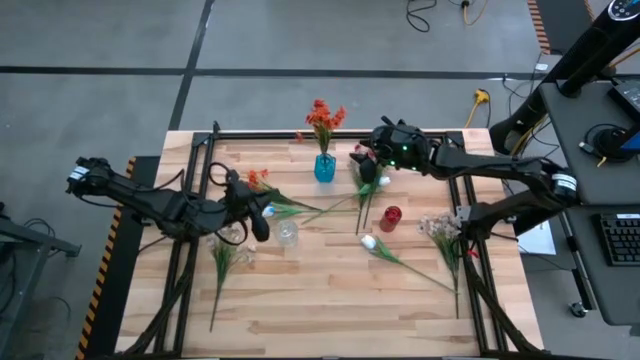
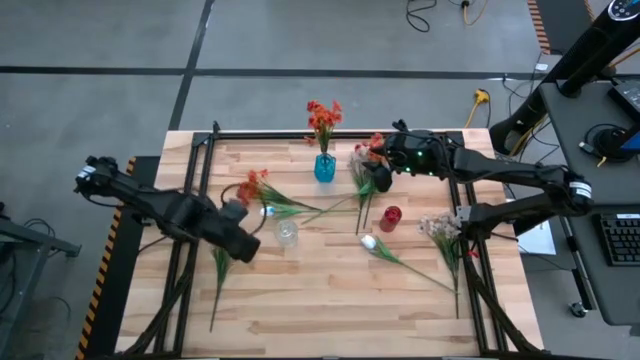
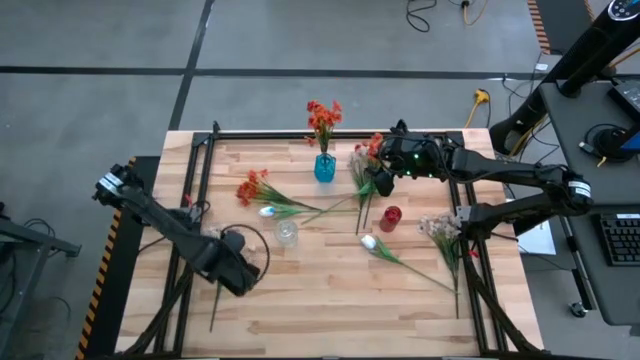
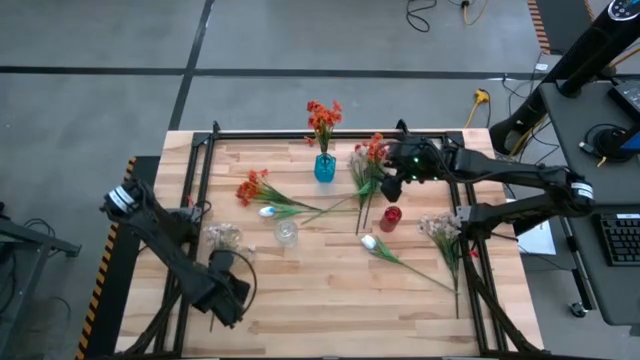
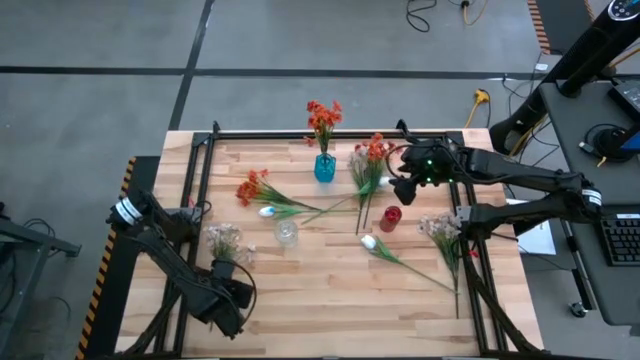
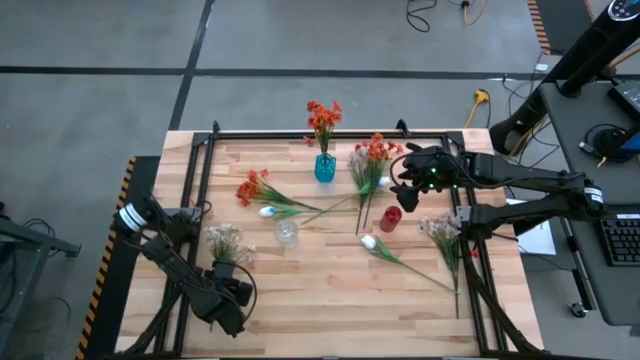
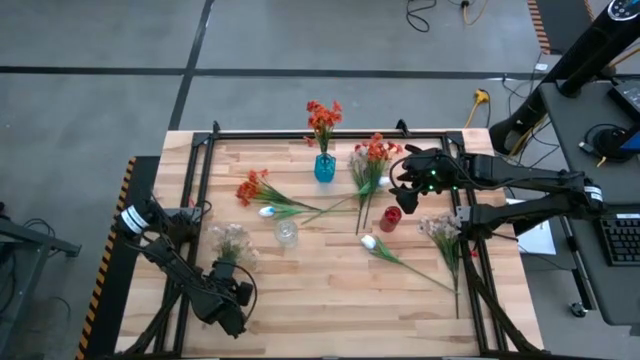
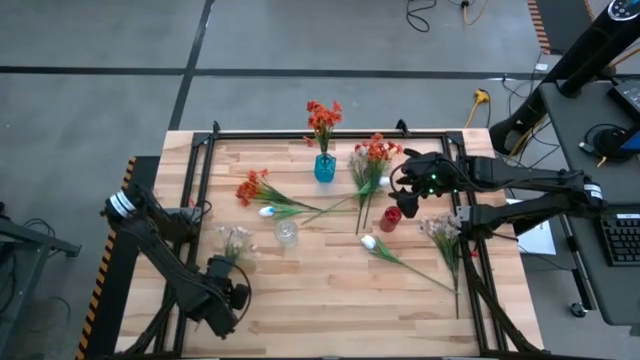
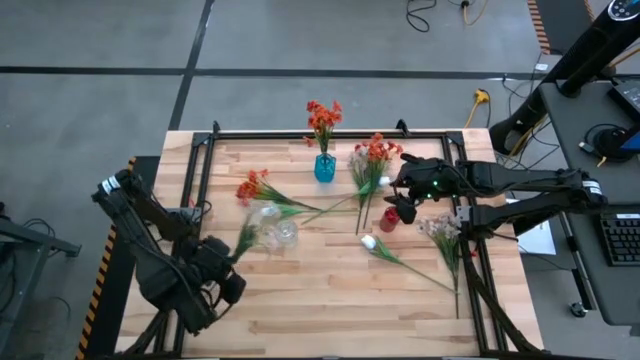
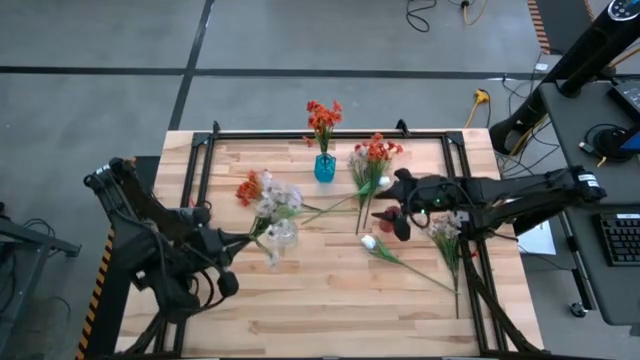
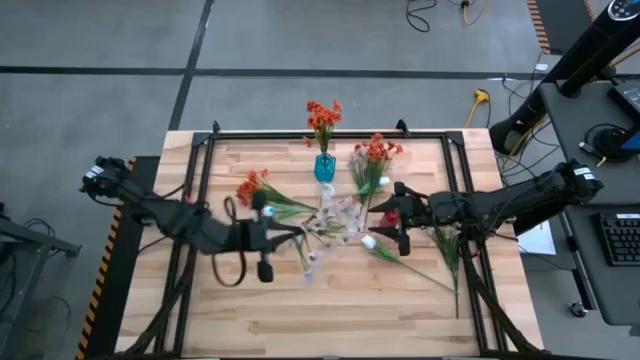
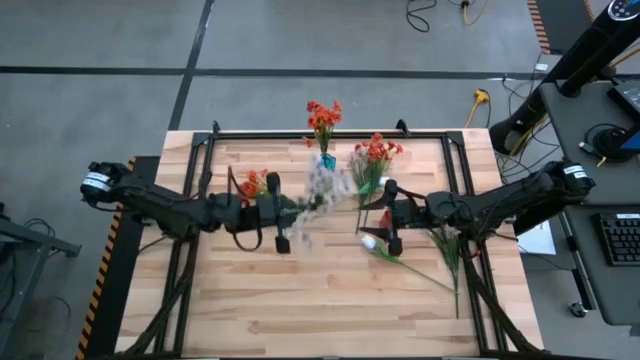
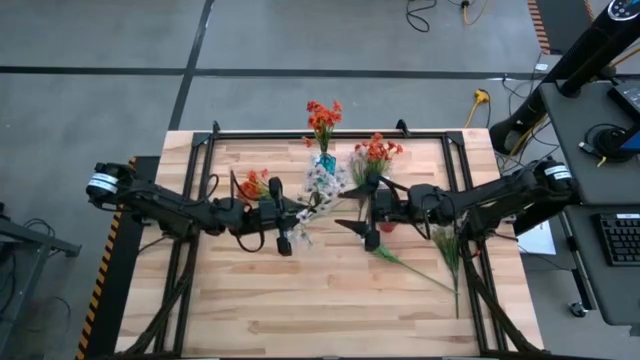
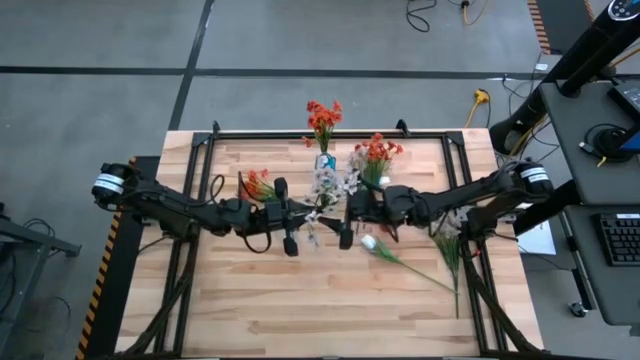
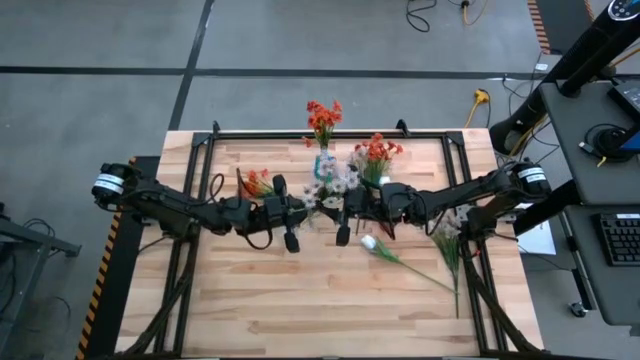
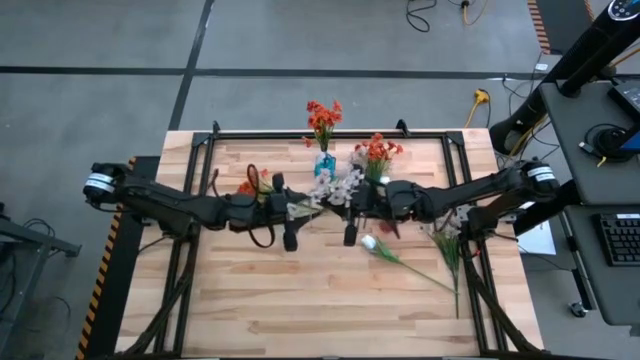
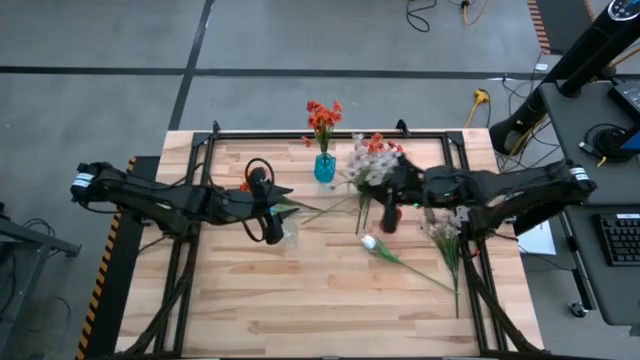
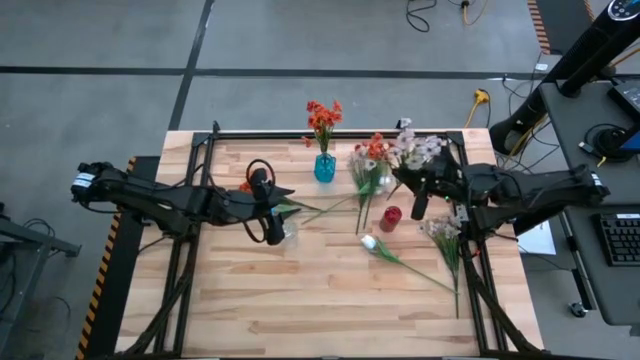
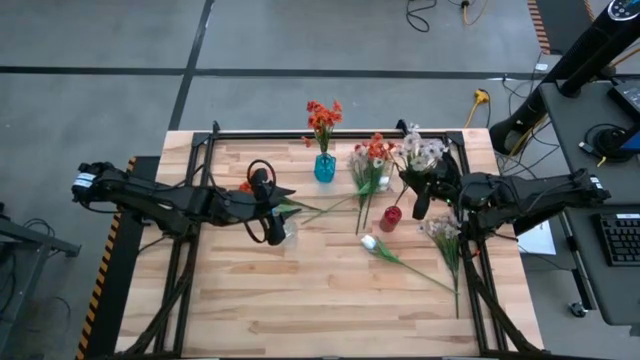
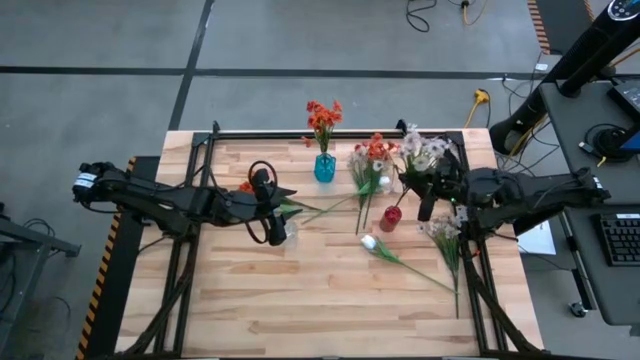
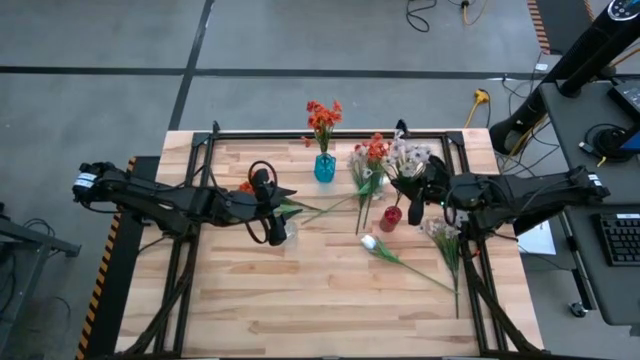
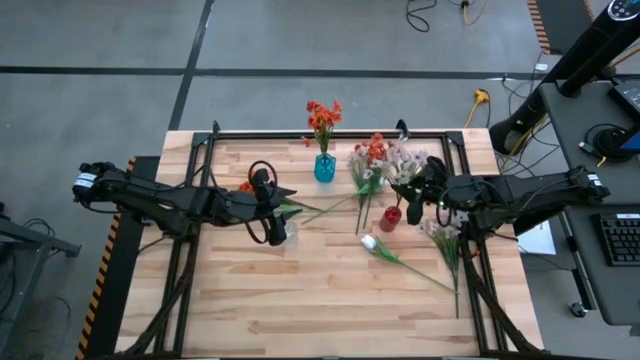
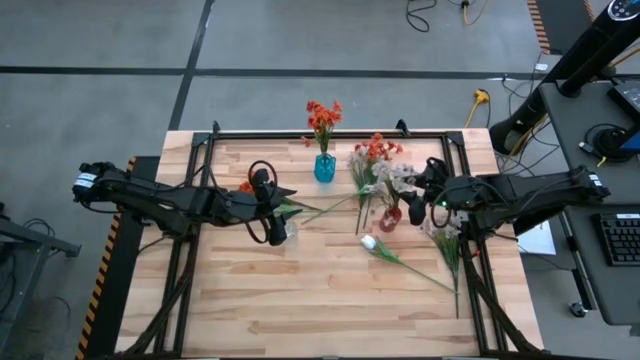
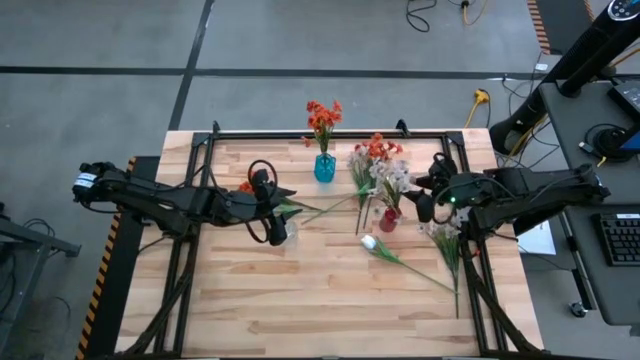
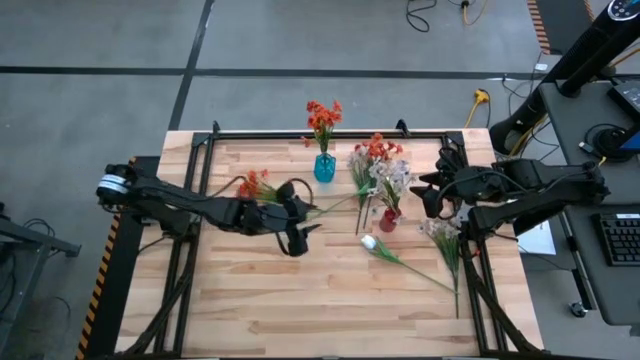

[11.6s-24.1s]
Task: Sort flowers into vase by color
Put the left white flowers into the red vase

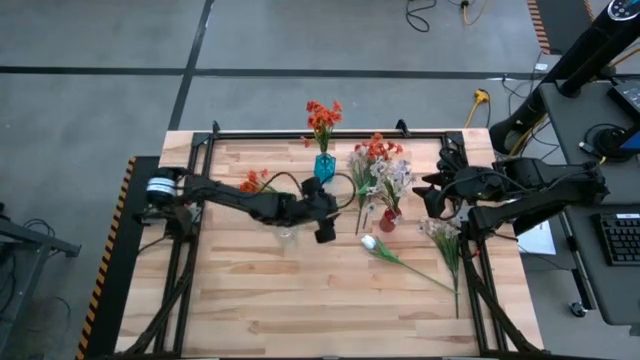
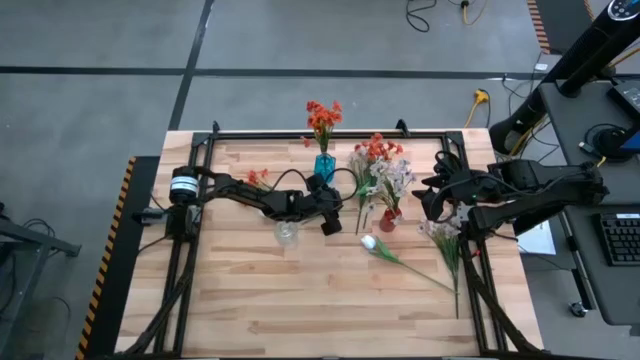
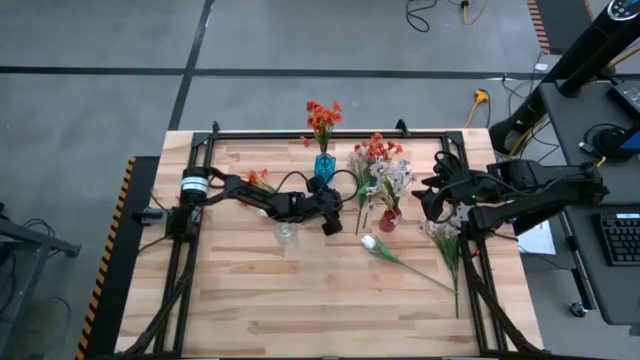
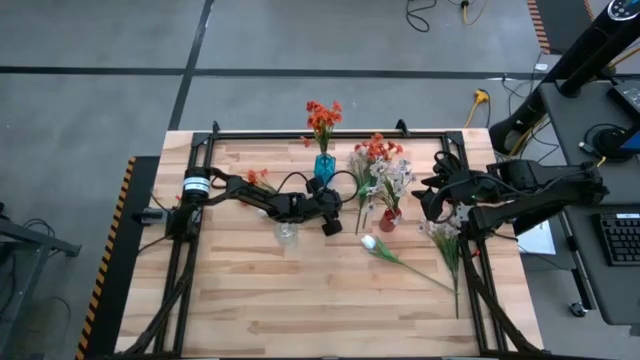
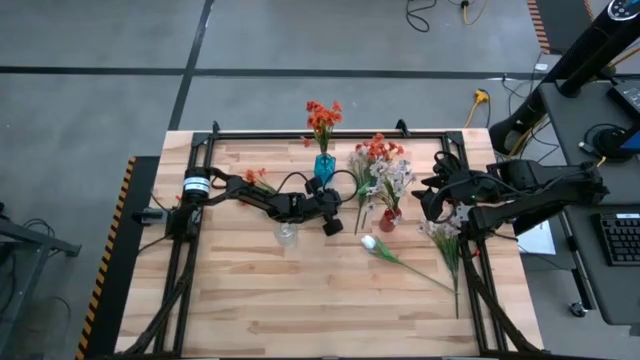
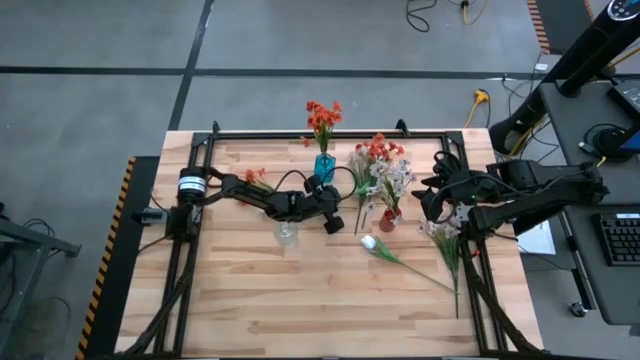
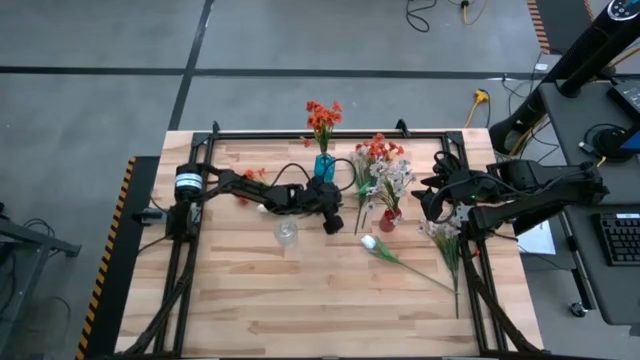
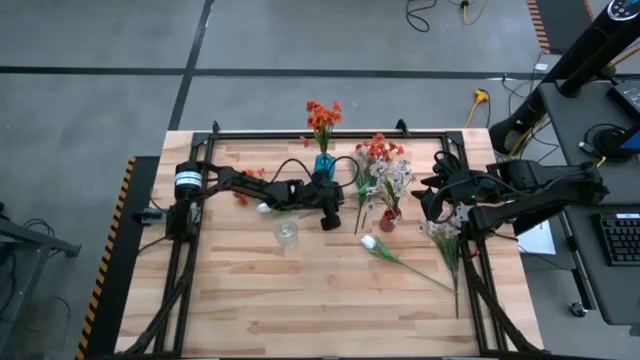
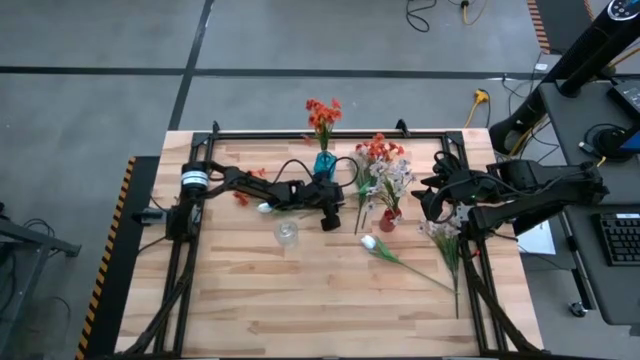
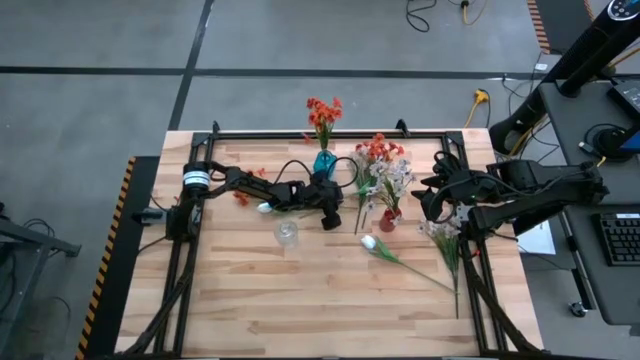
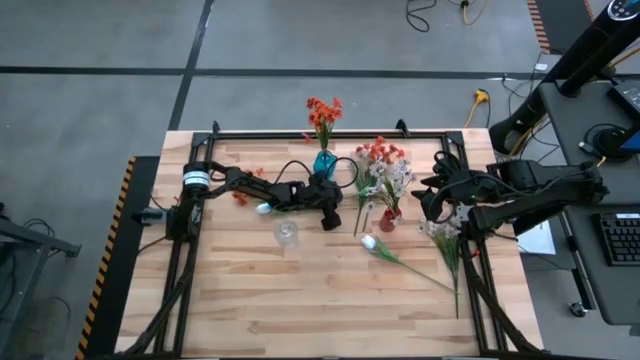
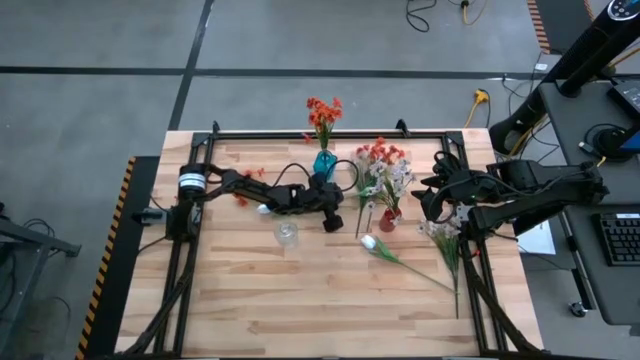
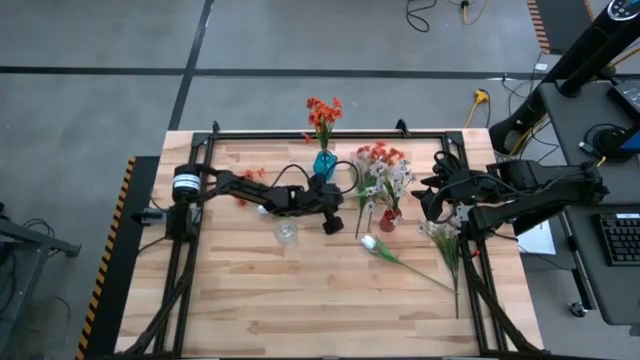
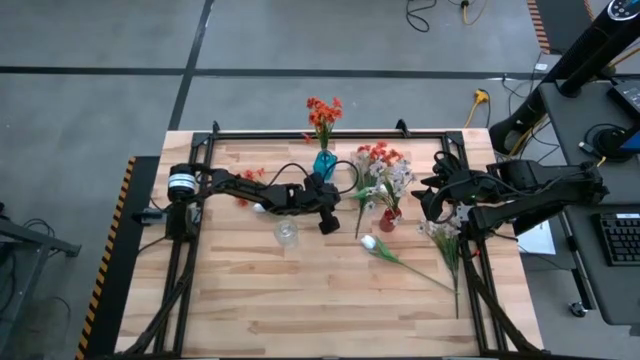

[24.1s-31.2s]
Put the top white flower into the transparent vase

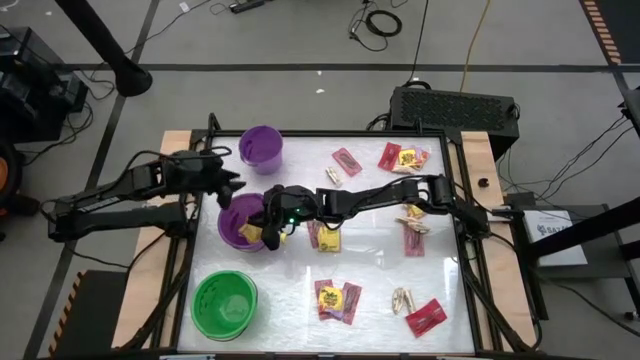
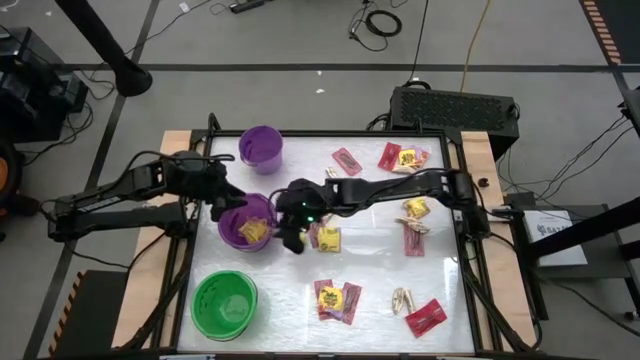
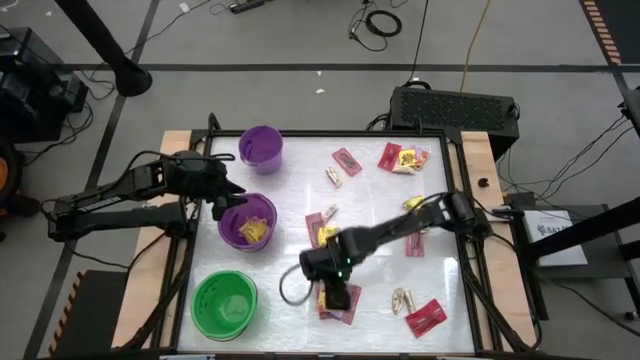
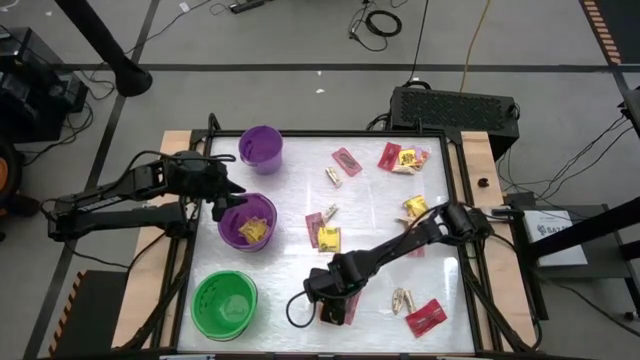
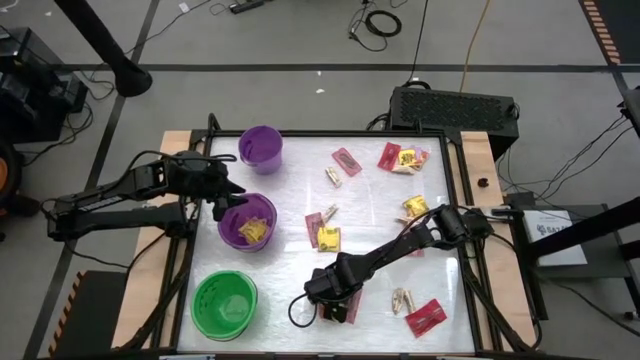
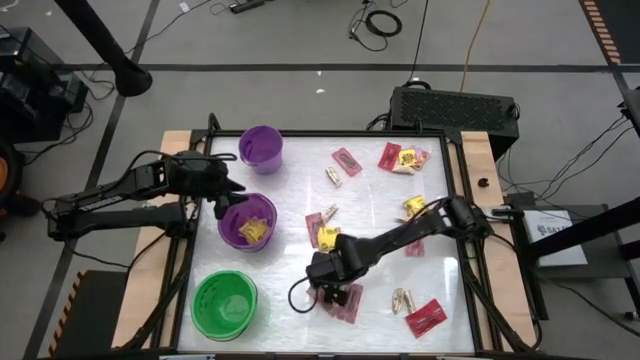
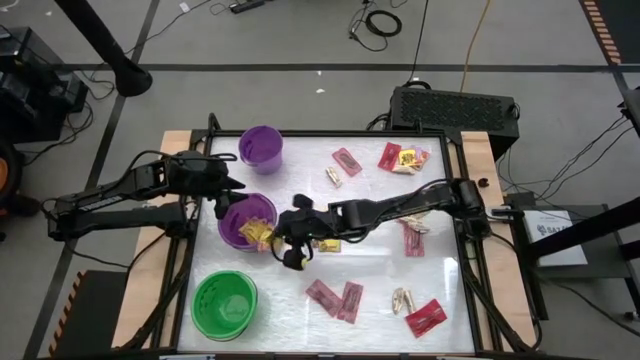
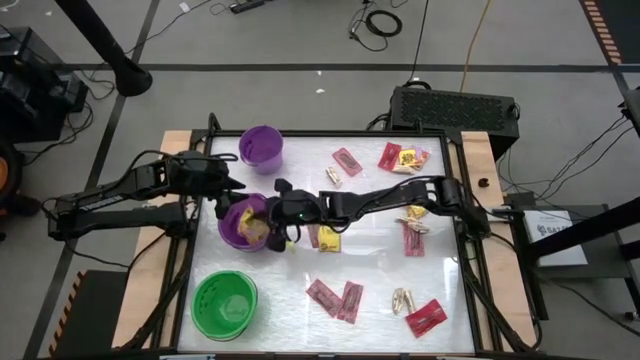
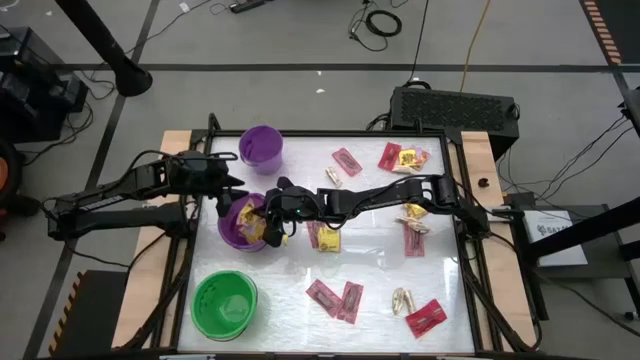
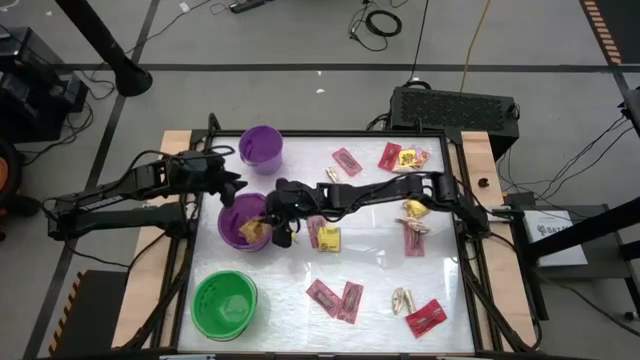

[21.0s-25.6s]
Task: Sort candy by brand, put in halloween buckets
Put the yellow candy into the bottom purple bucket
